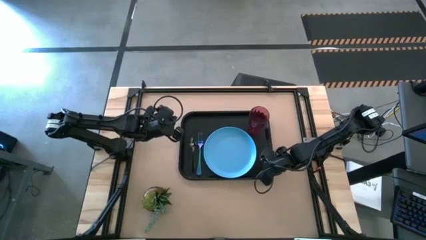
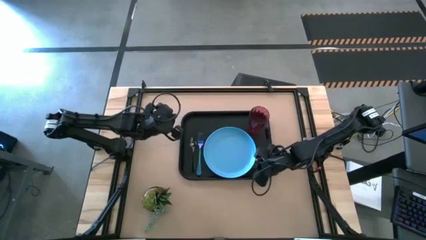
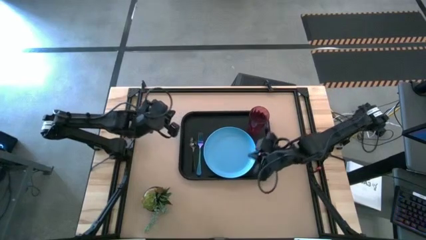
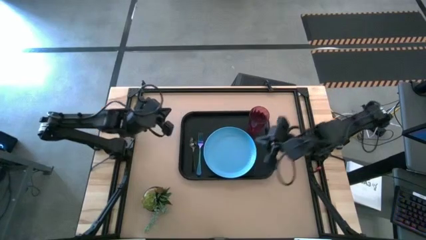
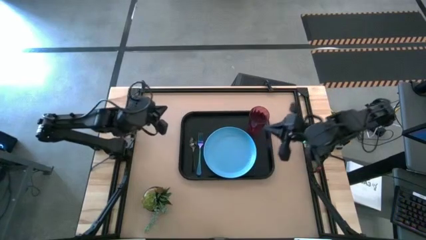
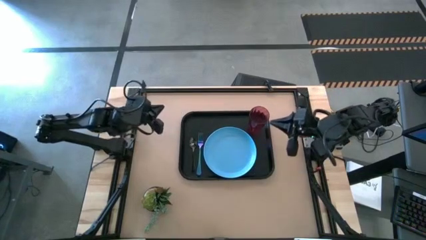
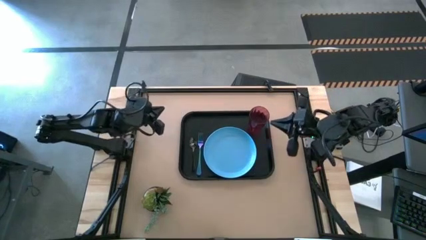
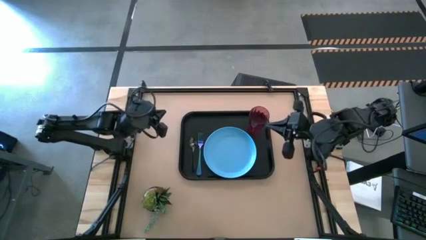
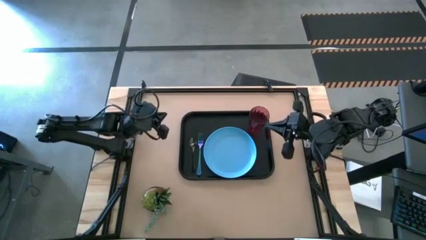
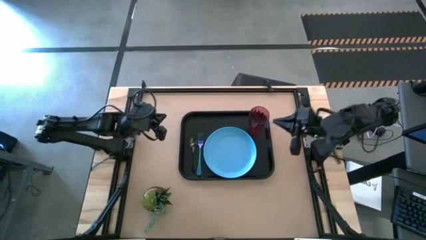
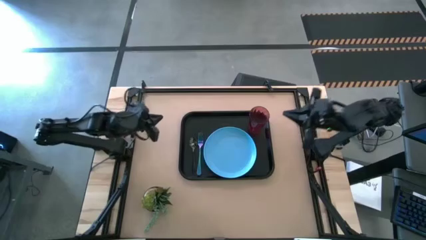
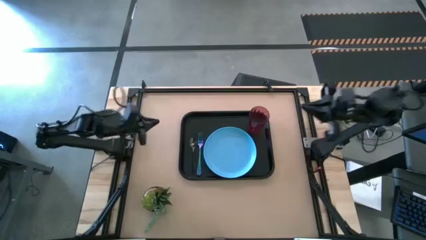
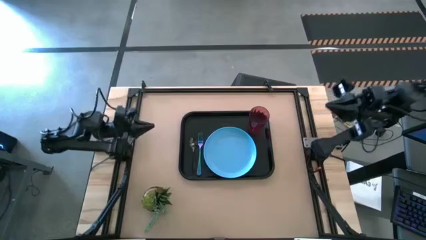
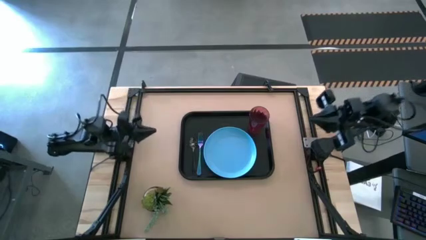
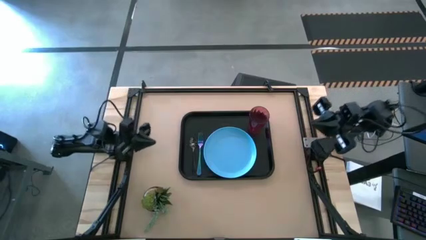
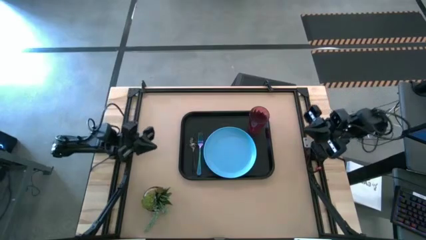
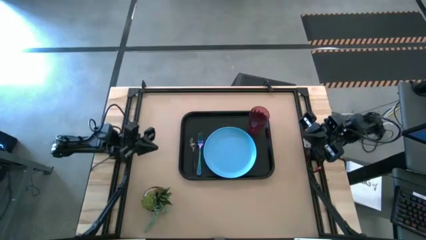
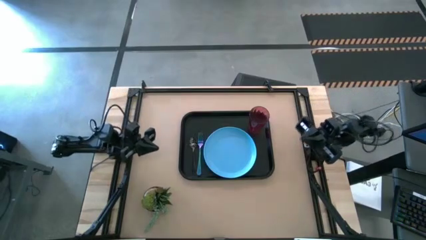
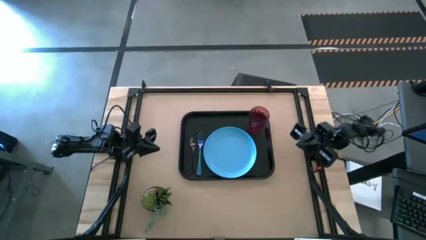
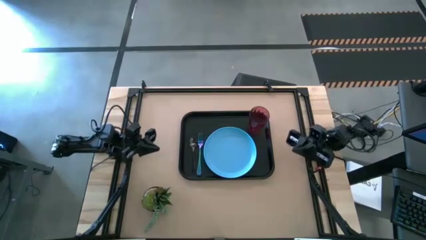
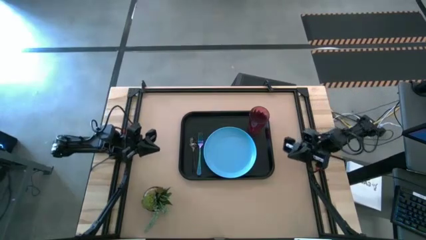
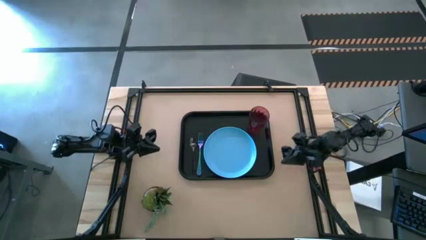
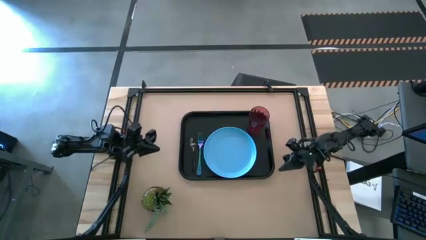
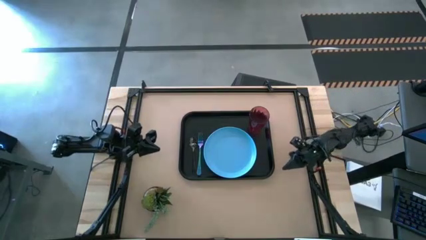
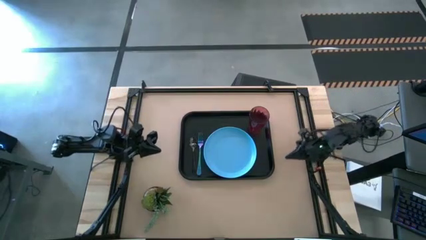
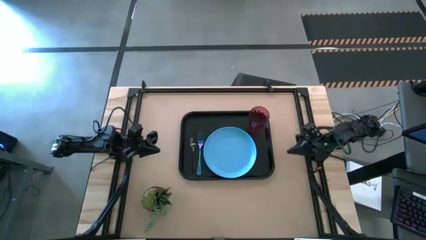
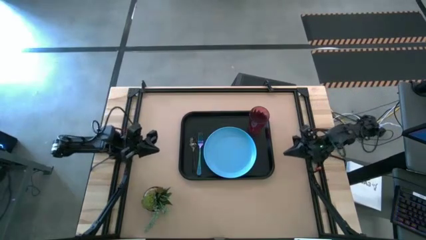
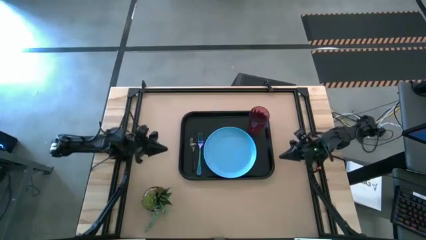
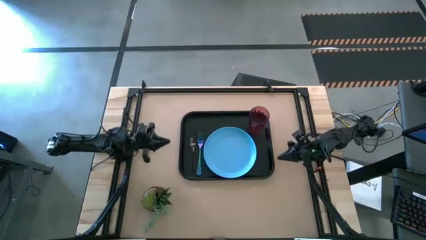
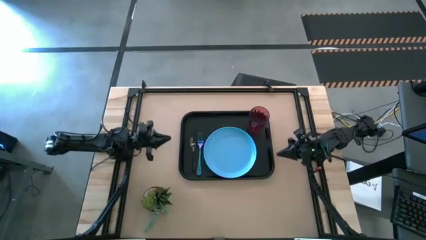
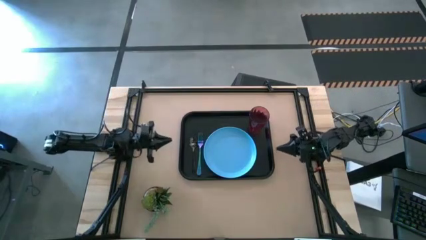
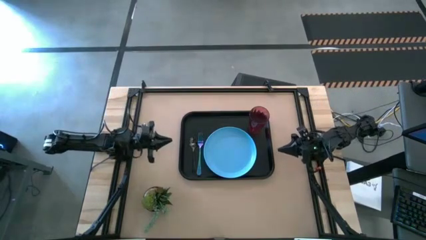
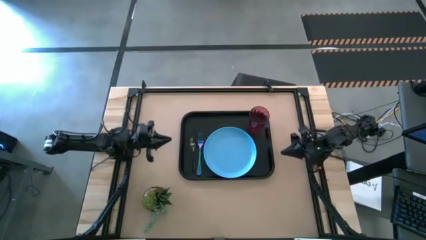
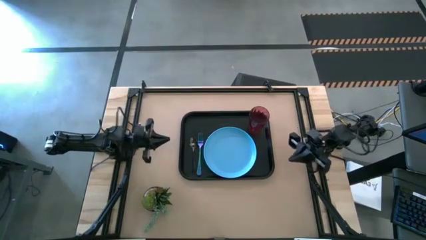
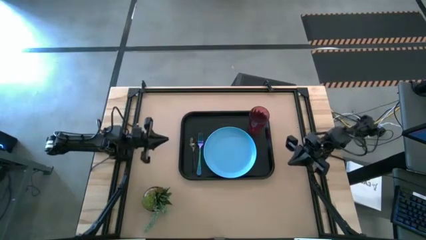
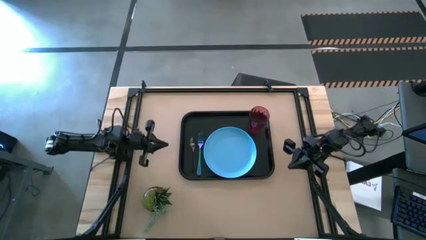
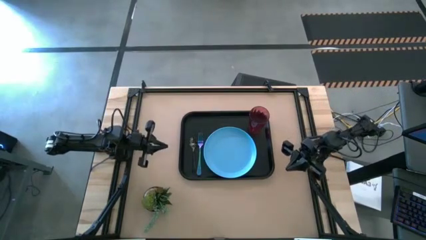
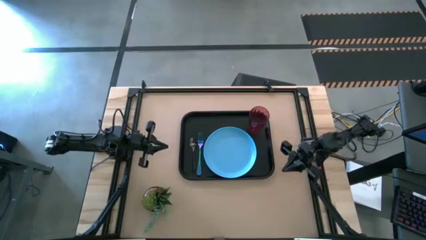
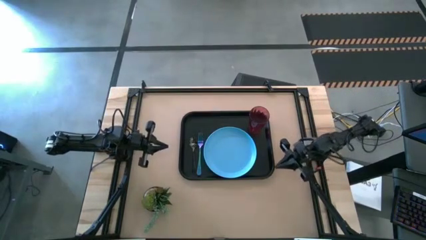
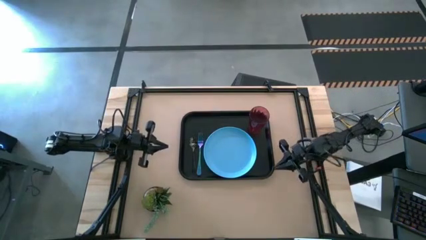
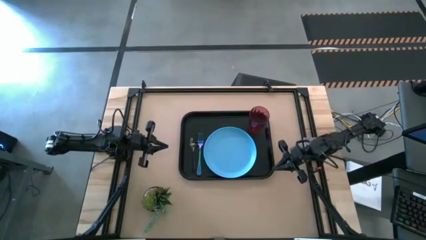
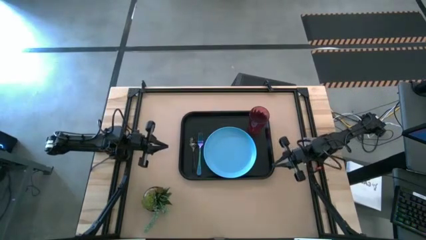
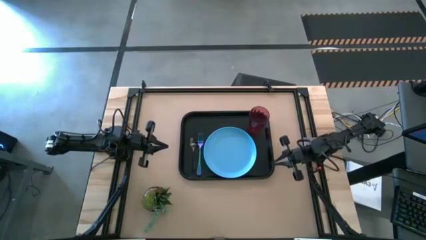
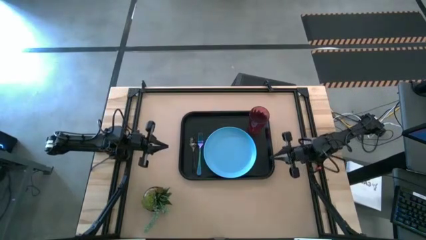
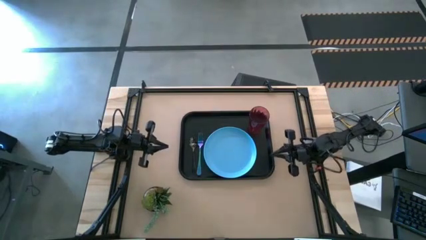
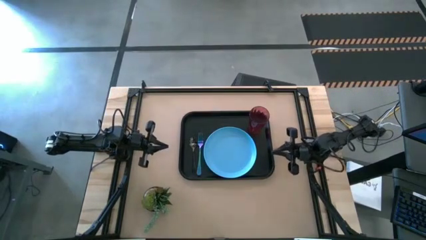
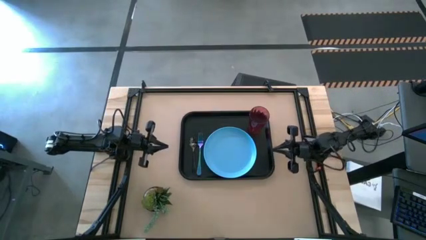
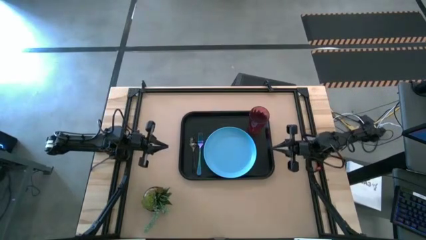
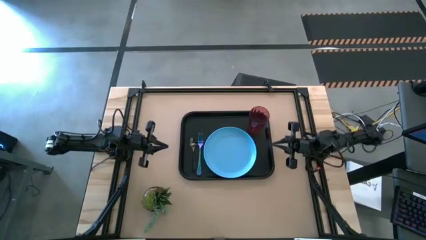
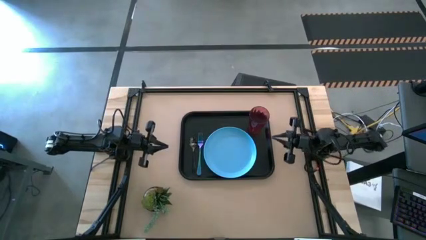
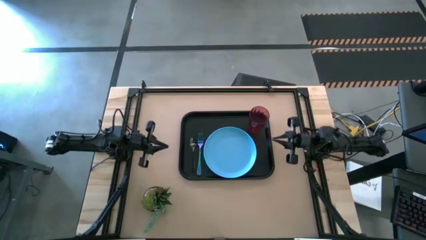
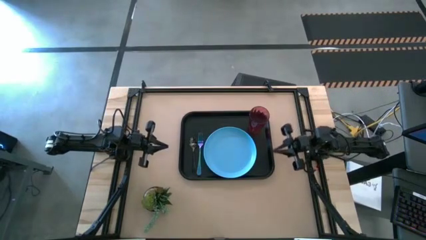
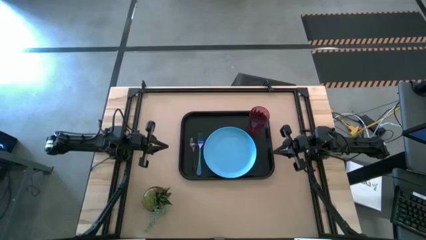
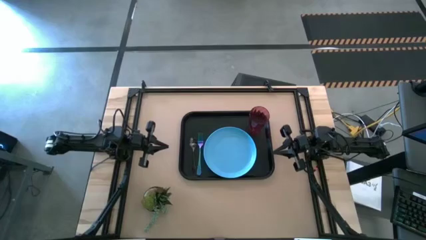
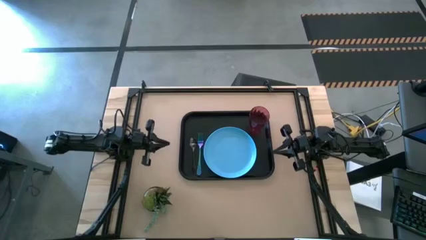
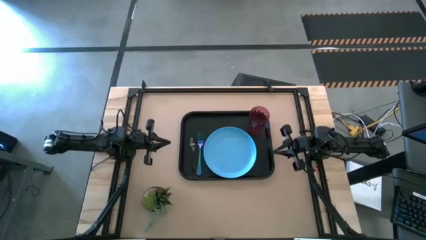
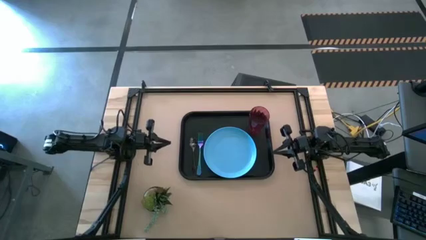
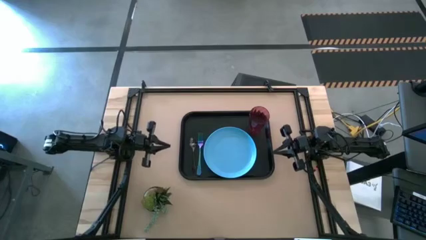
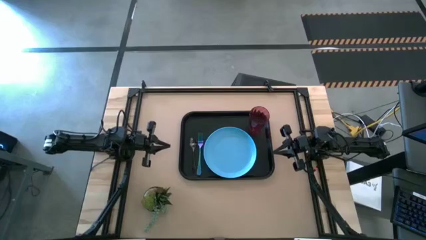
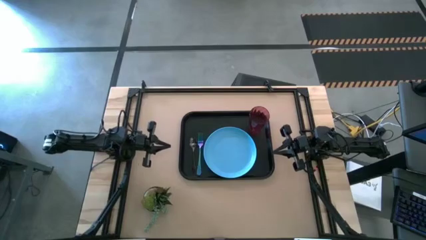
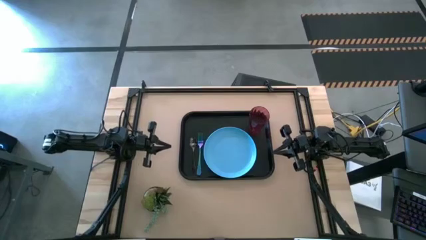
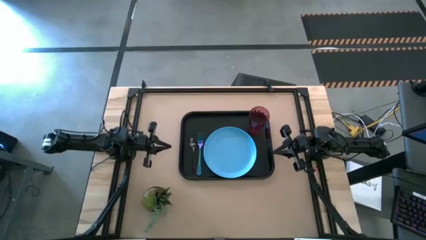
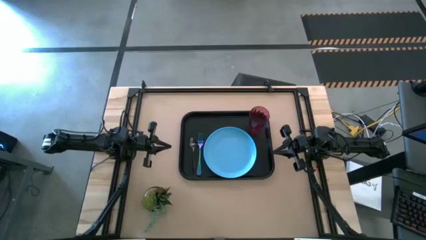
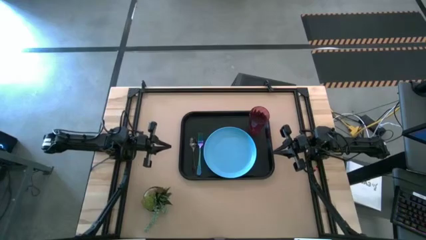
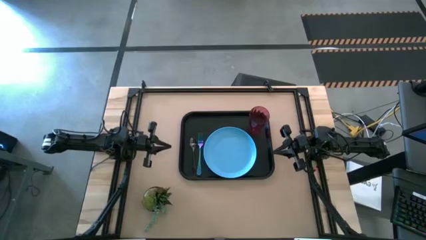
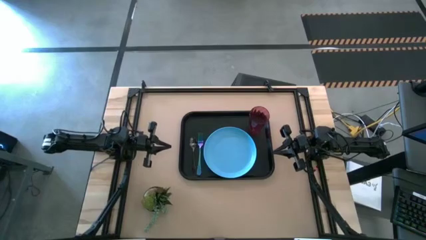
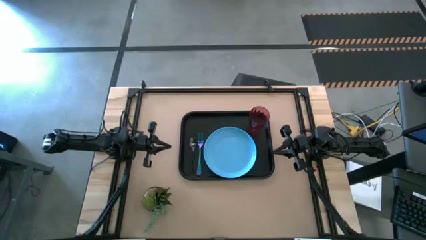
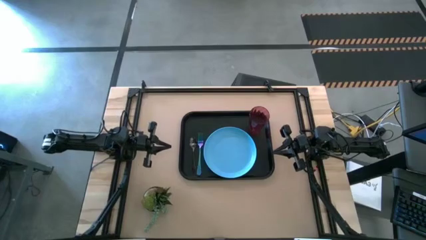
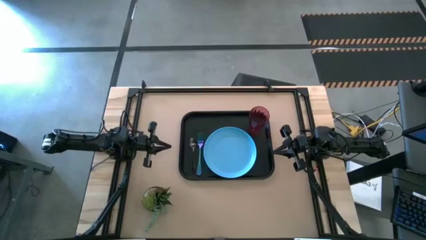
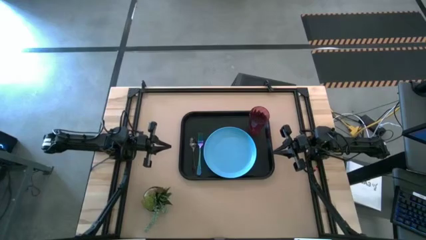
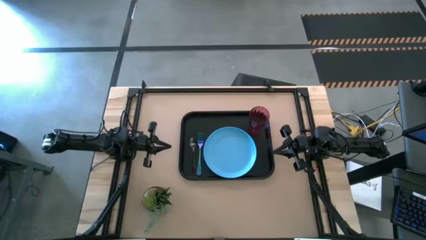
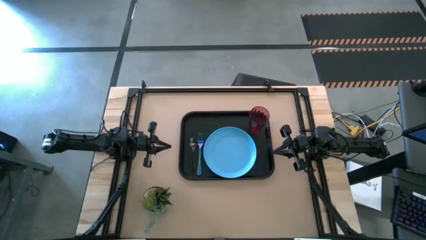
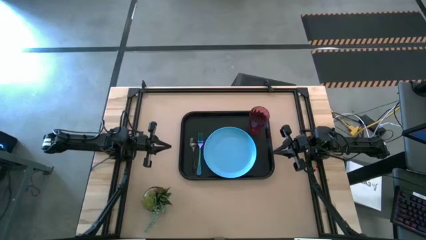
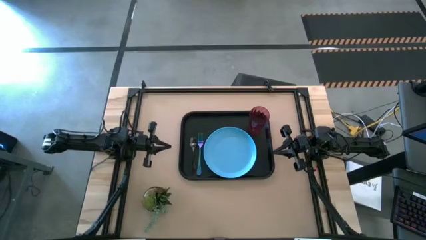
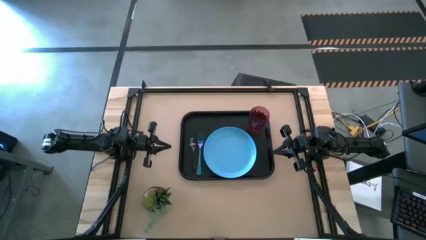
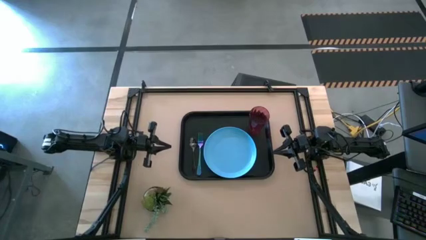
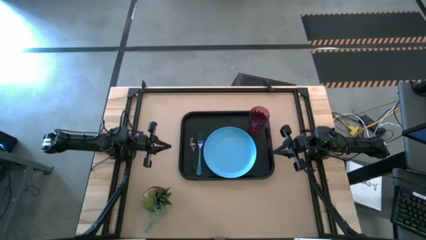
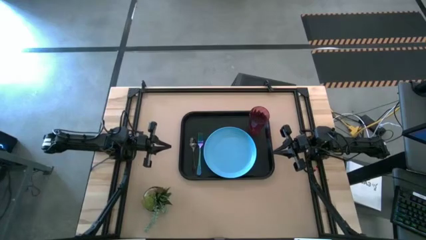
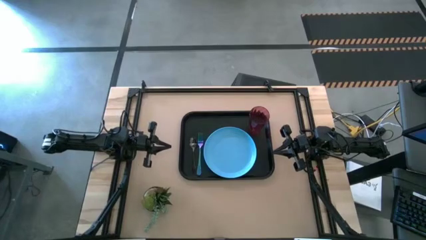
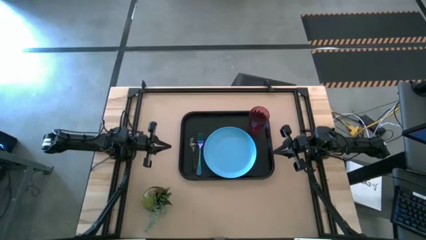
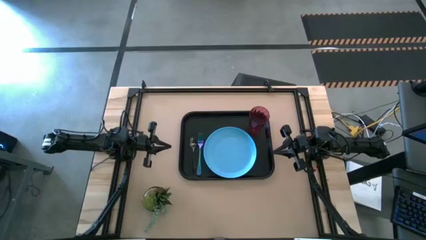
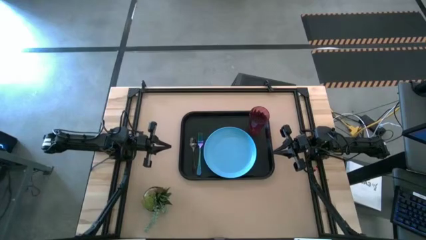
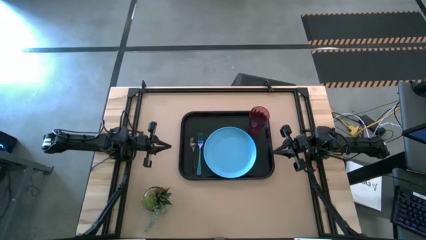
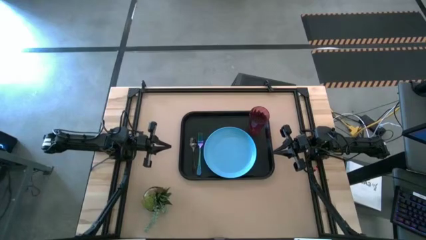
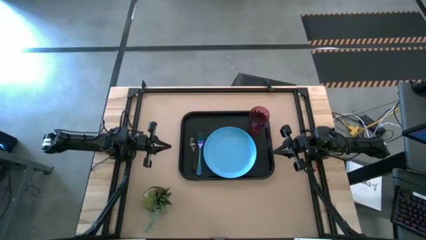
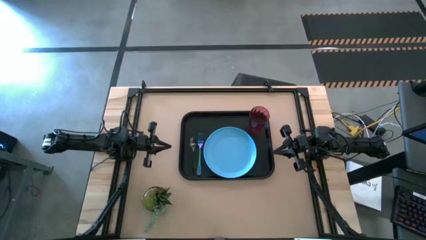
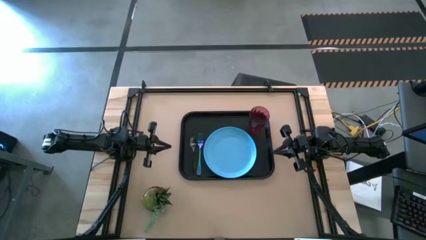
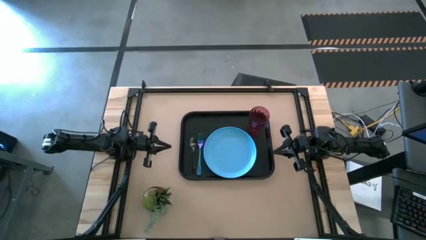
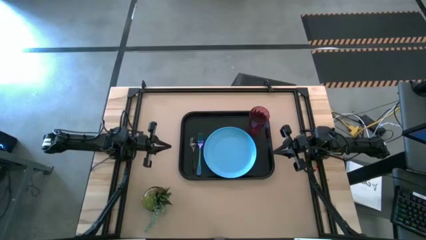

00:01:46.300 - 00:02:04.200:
Task: Pick and place plate/cup/fork/spoon on tray
Return to Home Position
